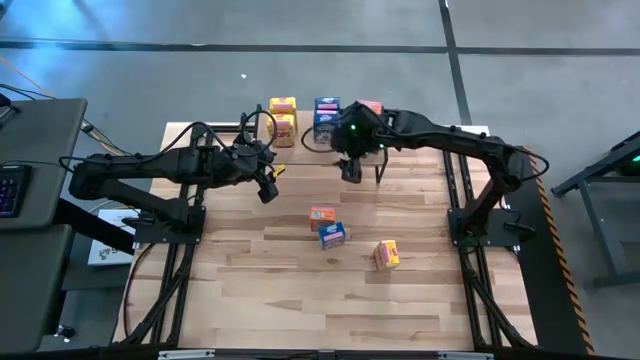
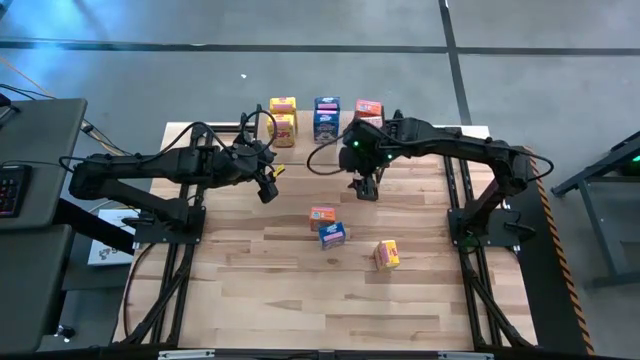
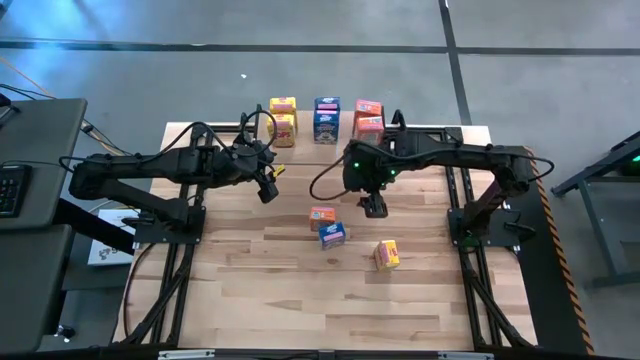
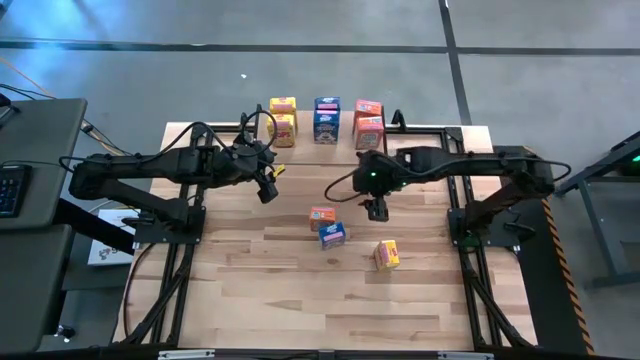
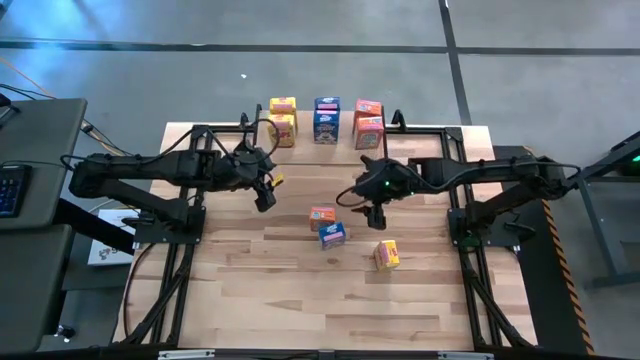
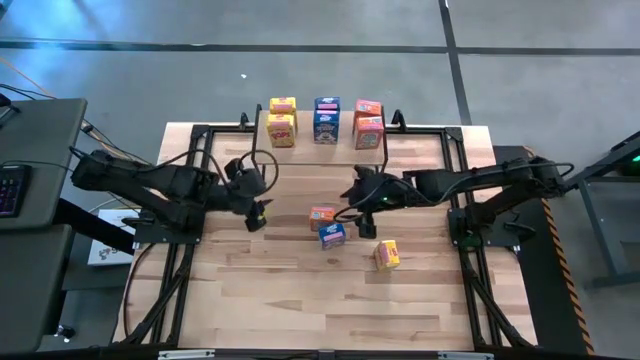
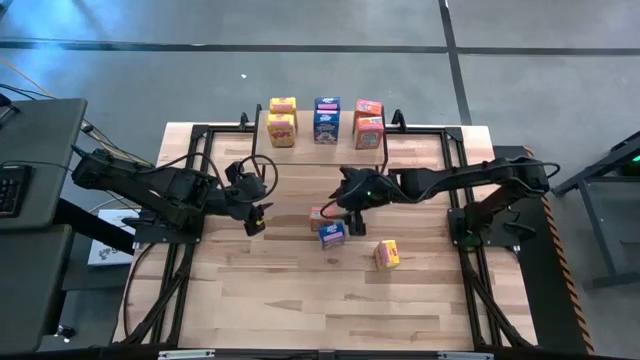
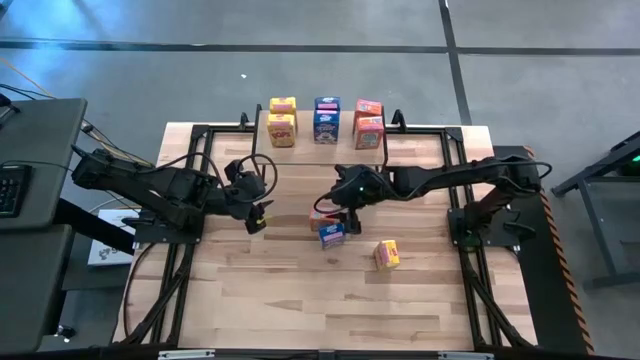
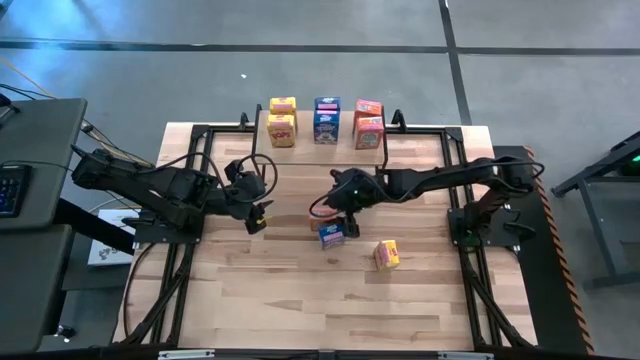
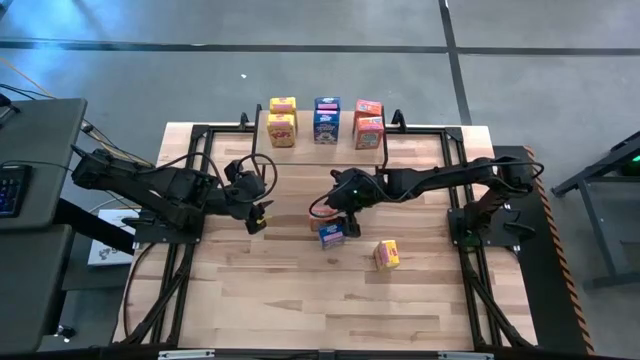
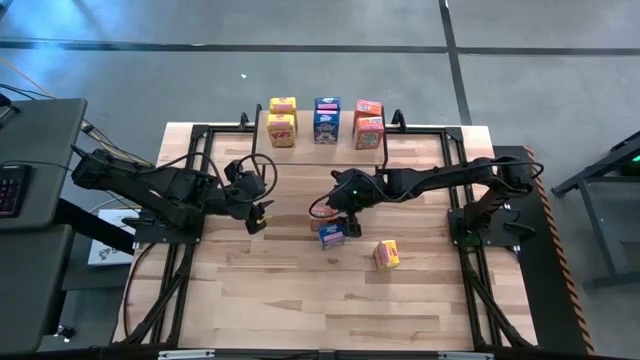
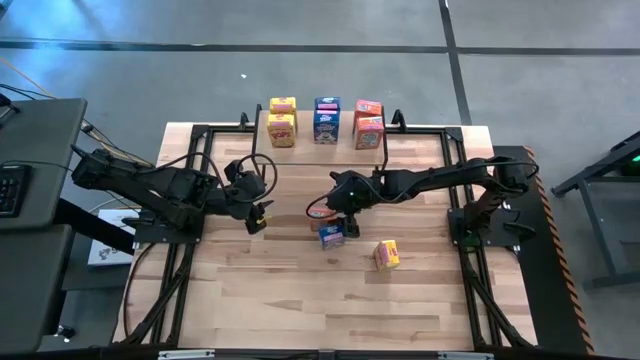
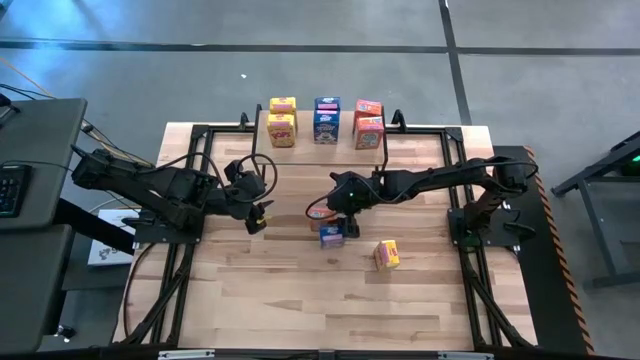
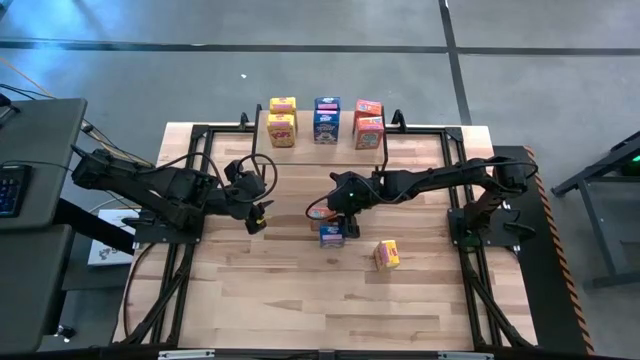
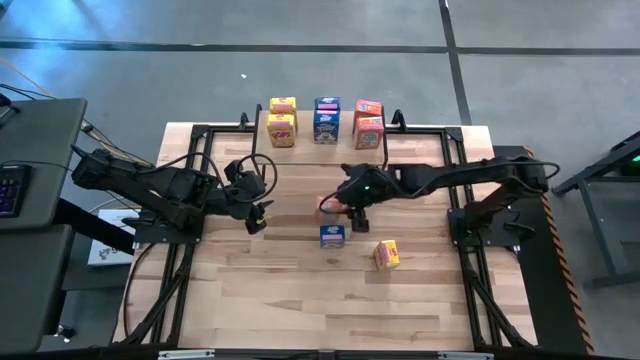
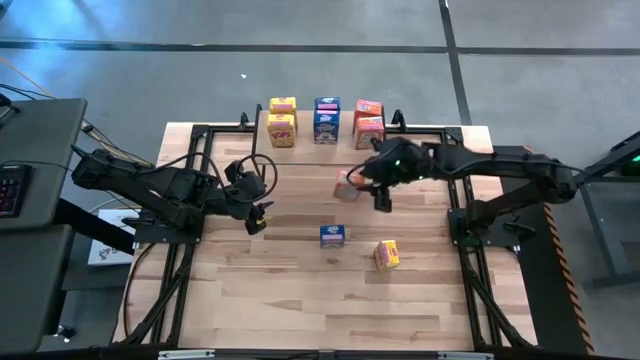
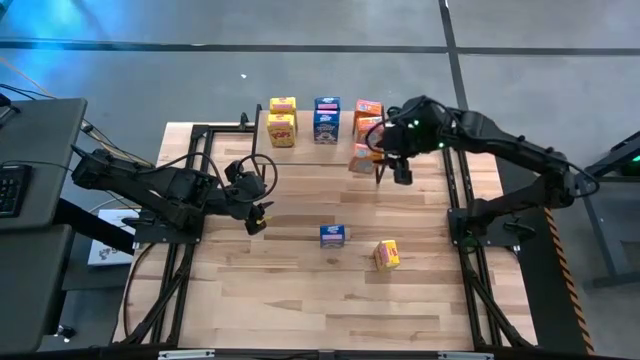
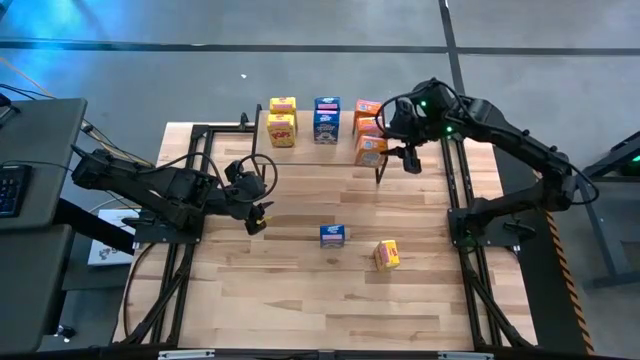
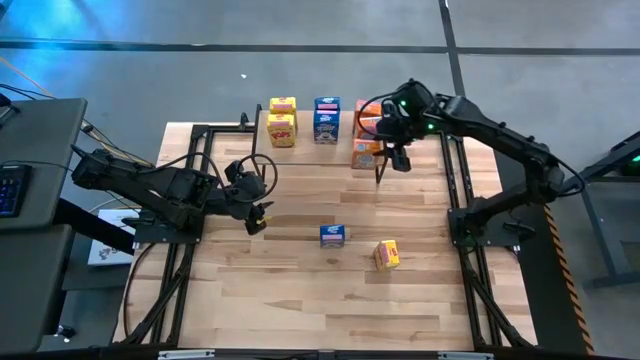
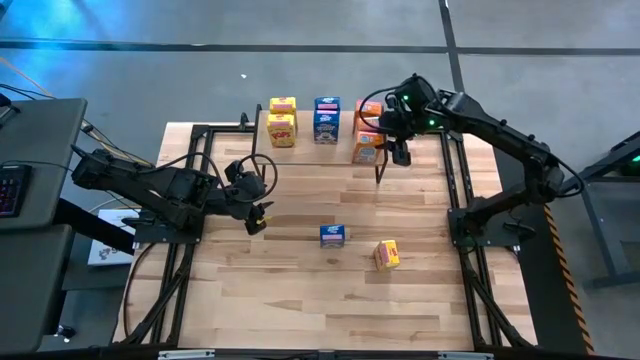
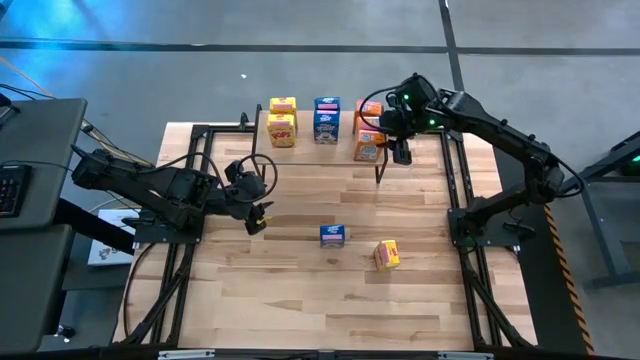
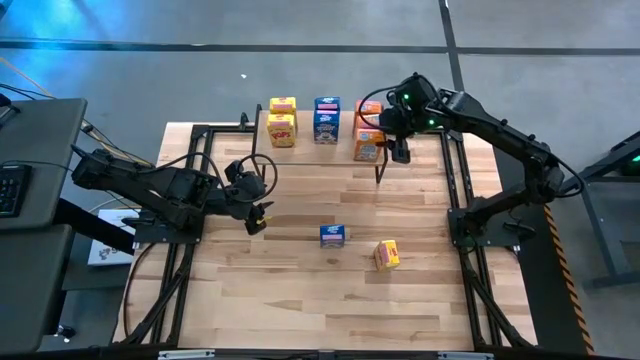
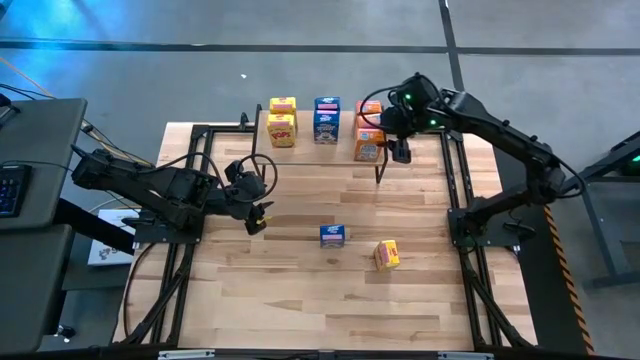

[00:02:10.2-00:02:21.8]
Task: Stack cereal on shelf
Put the orange cereal box on the shelf aligned with the other orange cereal boxes

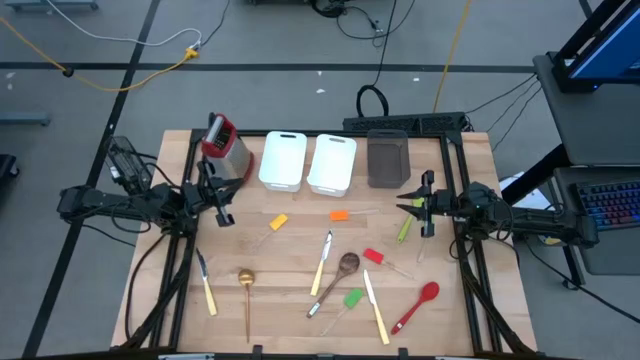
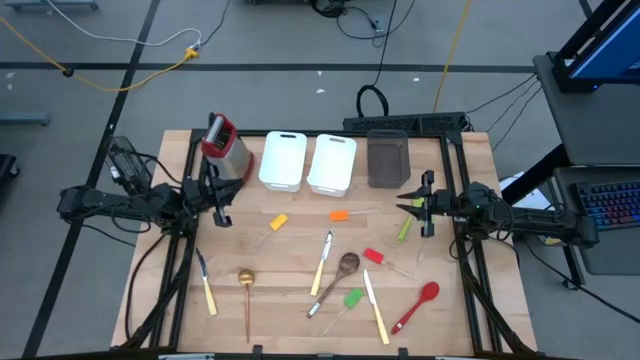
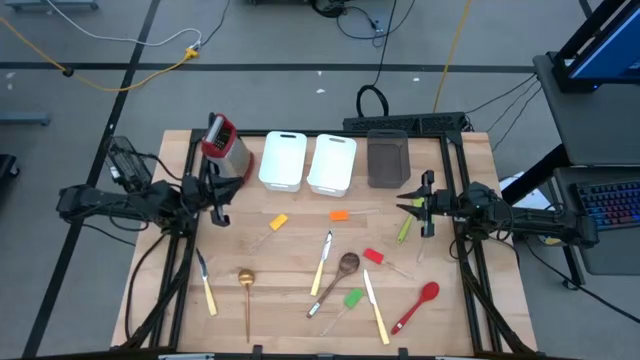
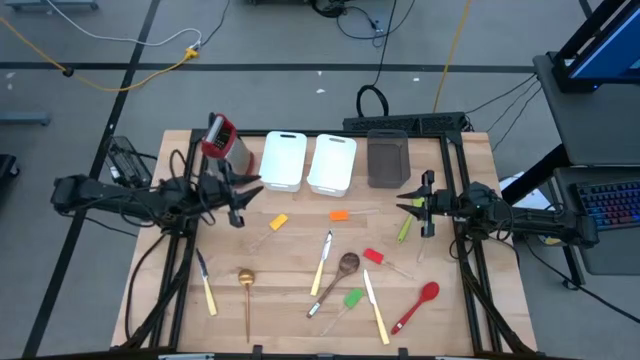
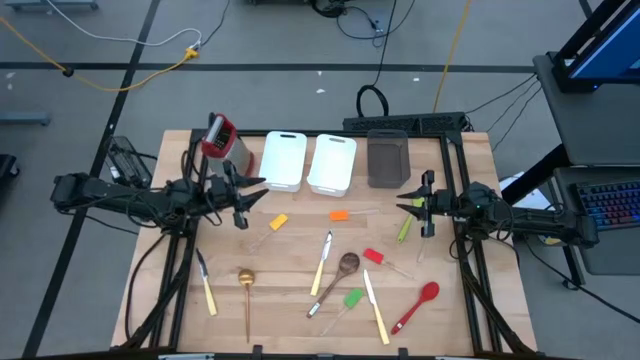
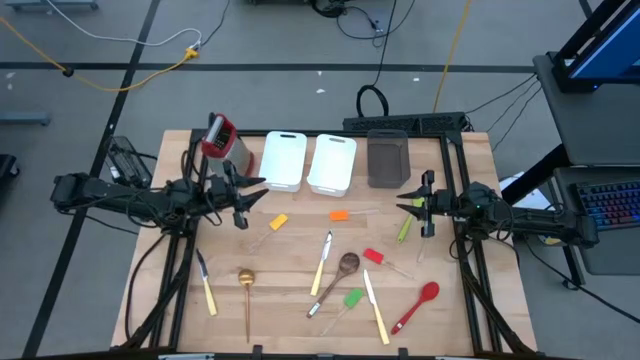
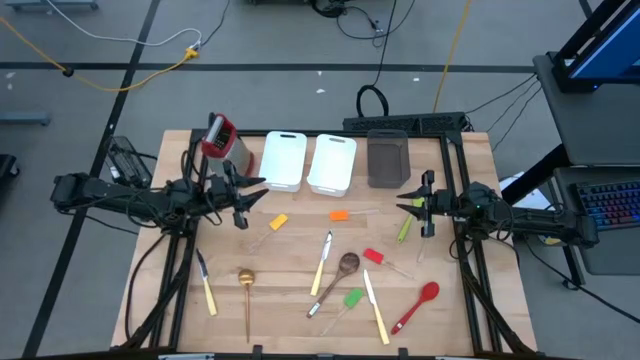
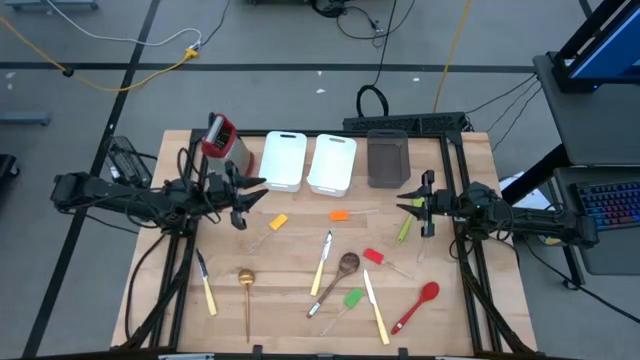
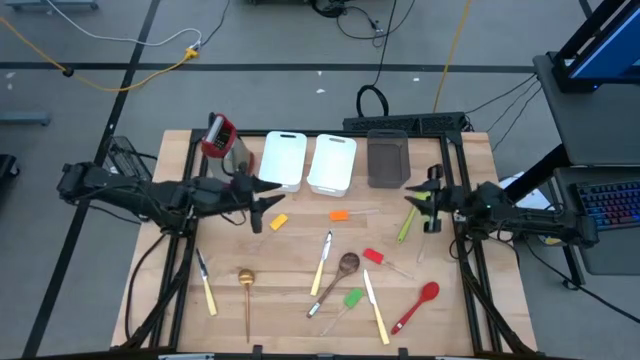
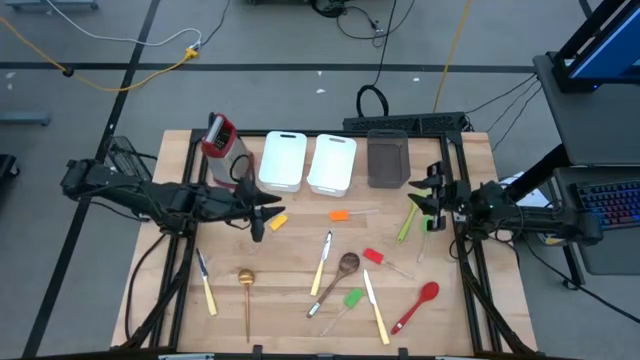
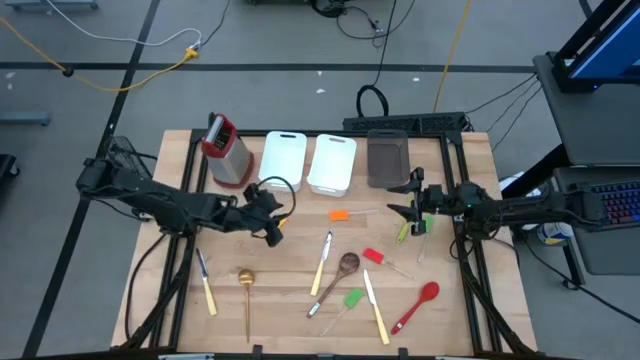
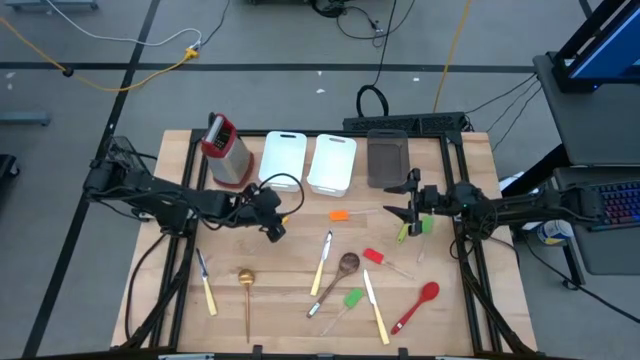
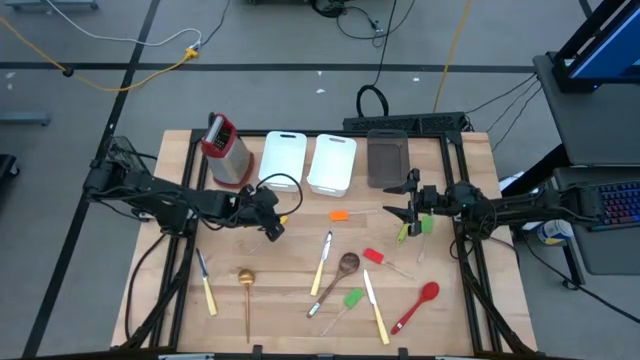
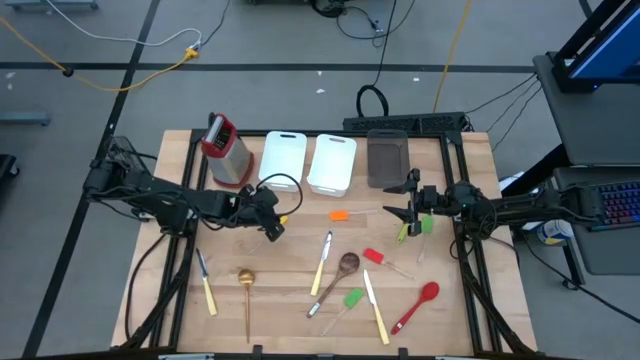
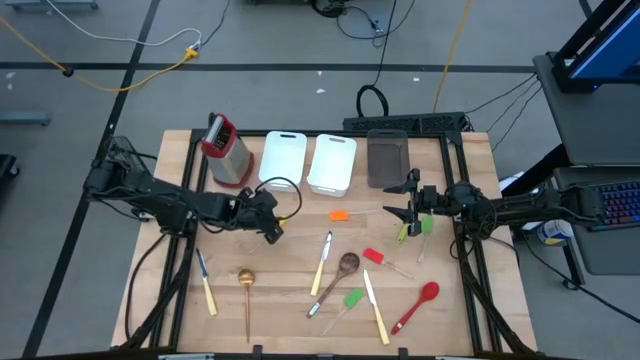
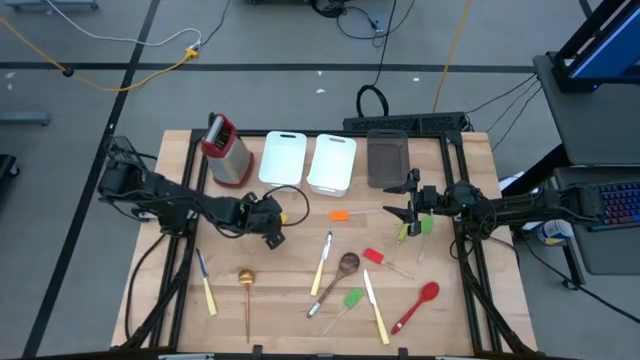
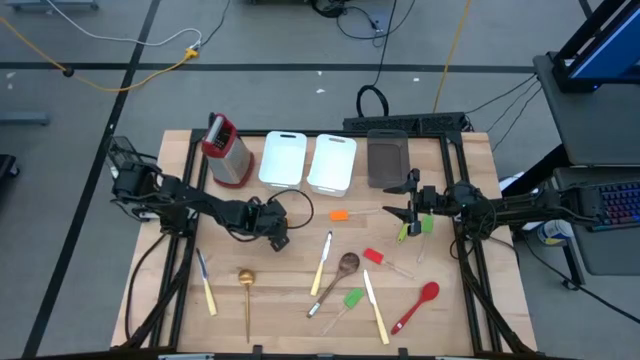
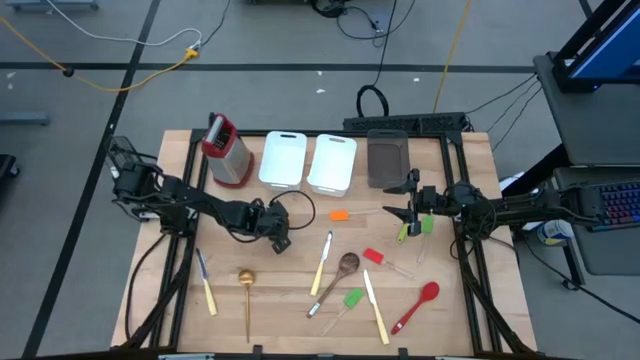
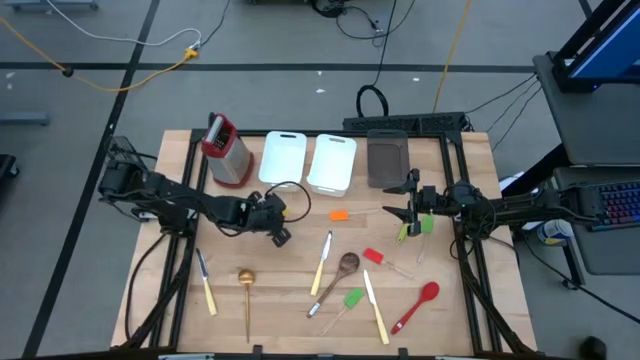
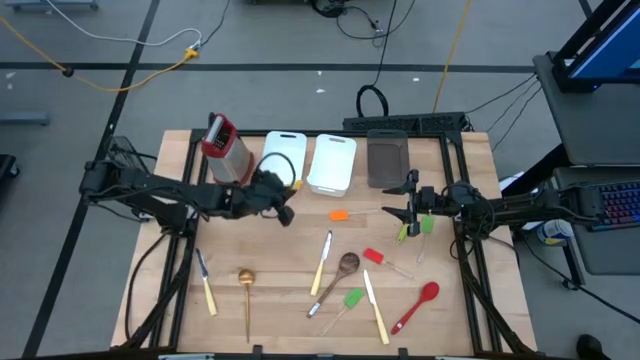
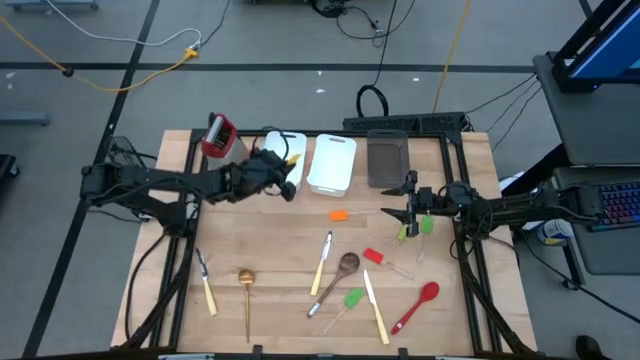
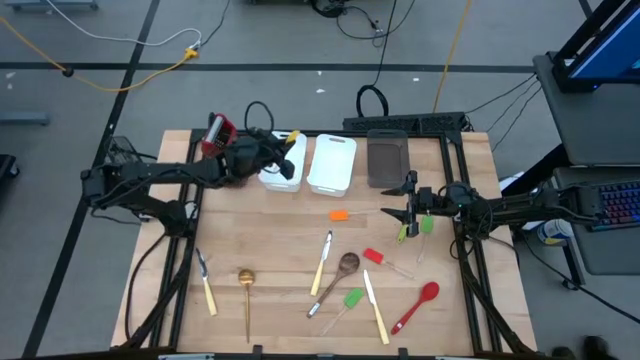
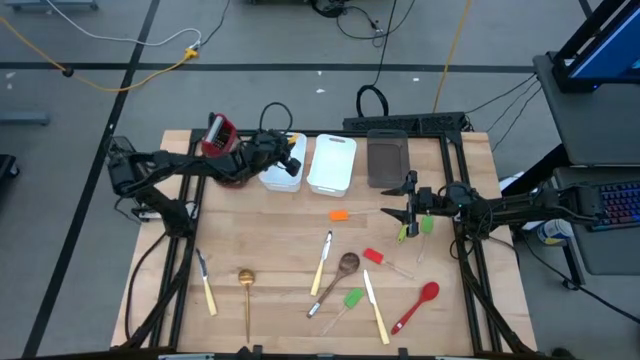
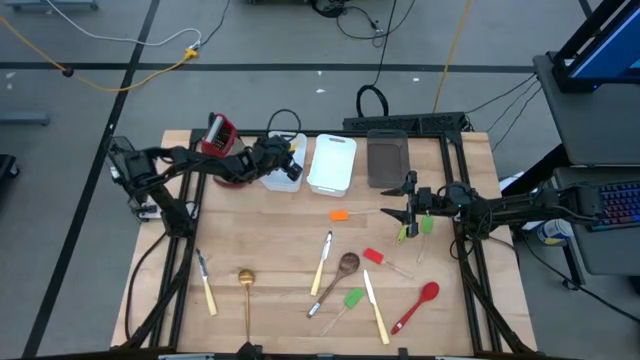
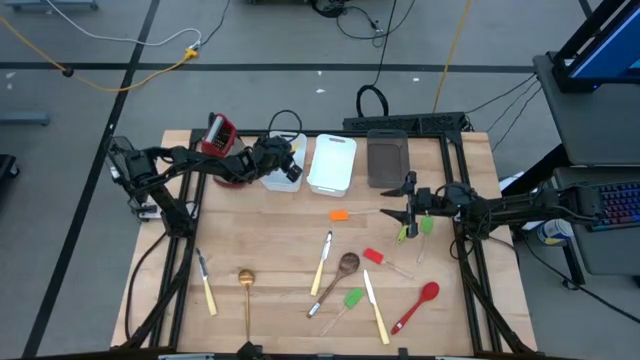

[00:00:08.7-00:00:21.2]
Task: Pick & Place Kitchen Items
Put the yellow spatula into the left white bin
